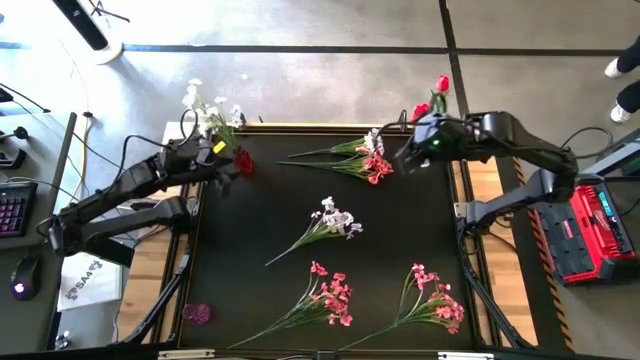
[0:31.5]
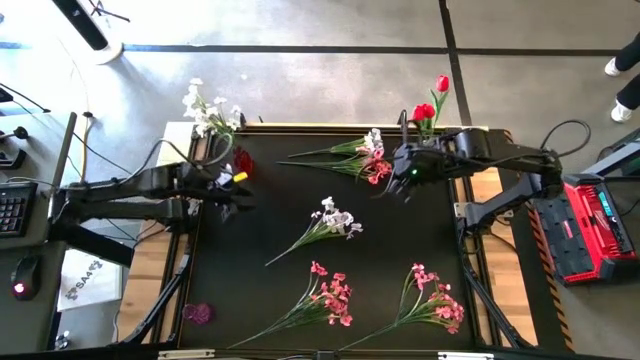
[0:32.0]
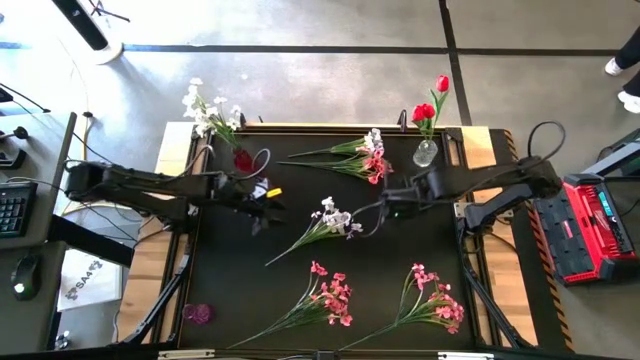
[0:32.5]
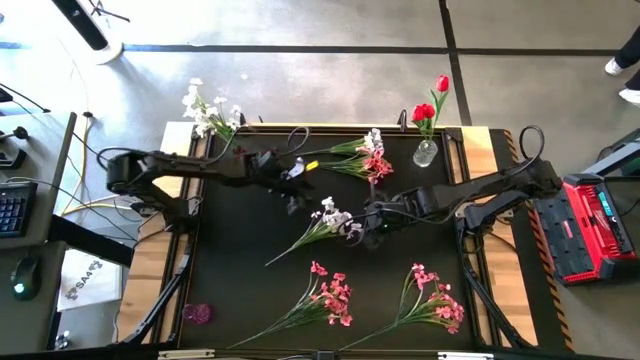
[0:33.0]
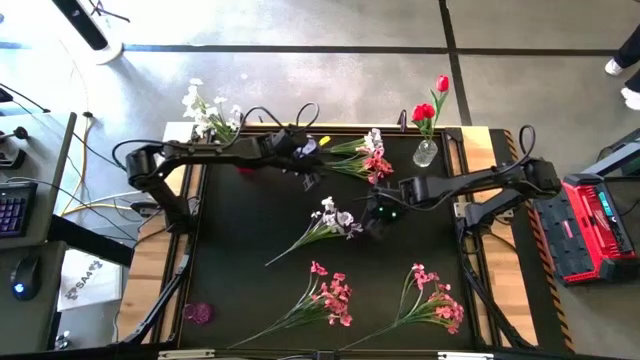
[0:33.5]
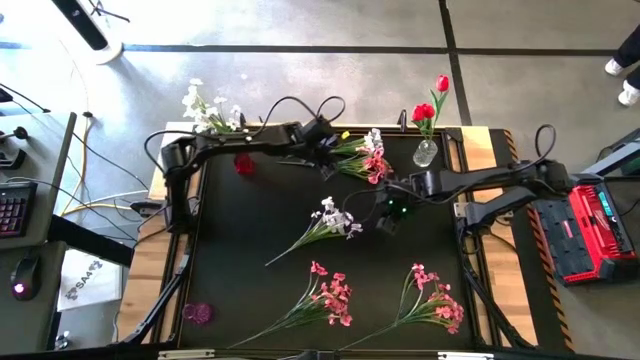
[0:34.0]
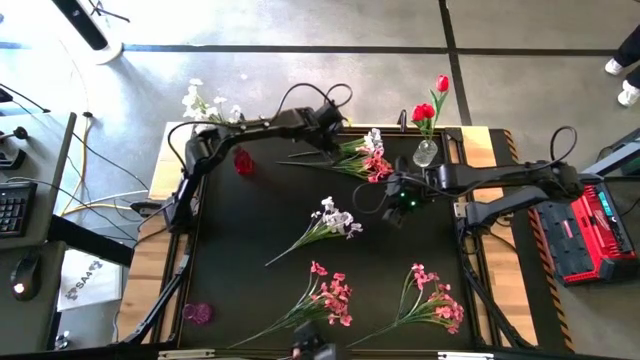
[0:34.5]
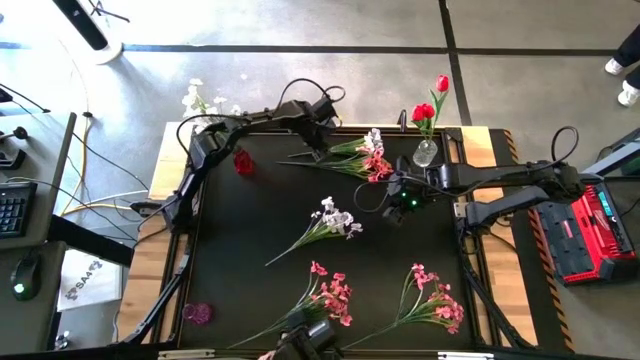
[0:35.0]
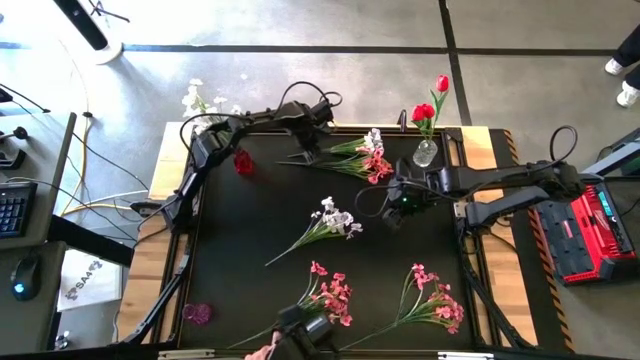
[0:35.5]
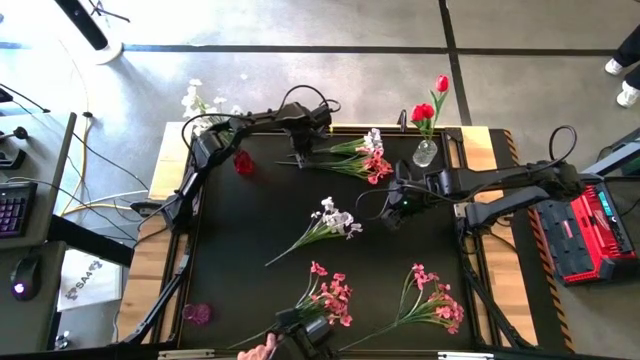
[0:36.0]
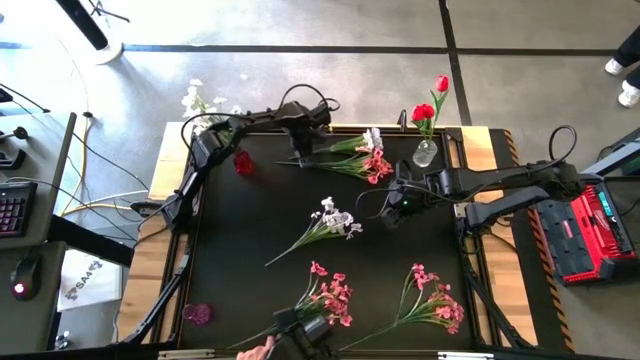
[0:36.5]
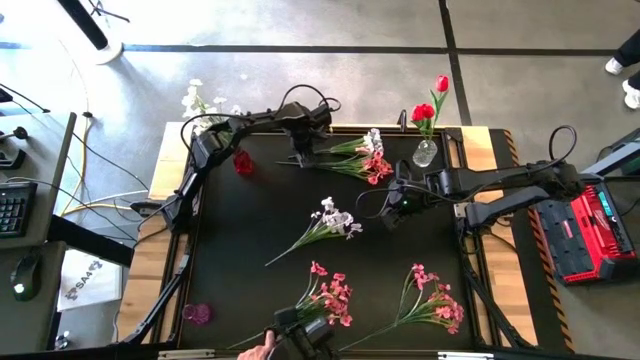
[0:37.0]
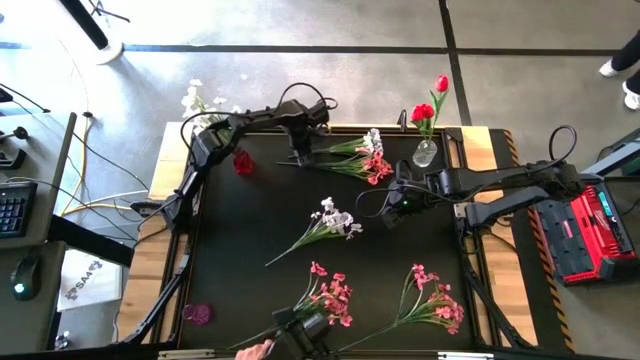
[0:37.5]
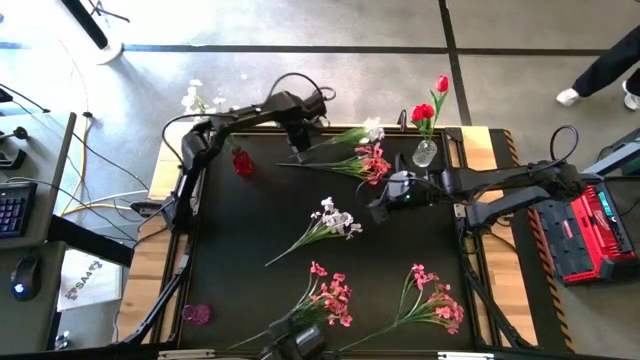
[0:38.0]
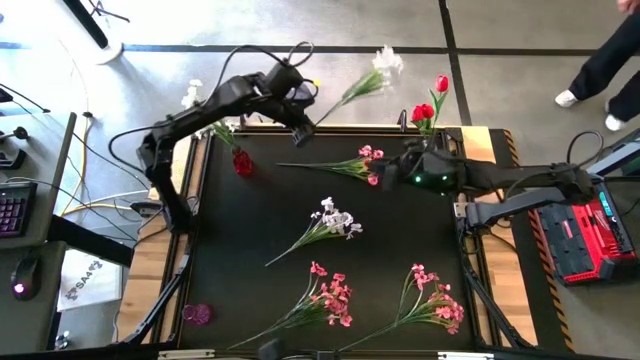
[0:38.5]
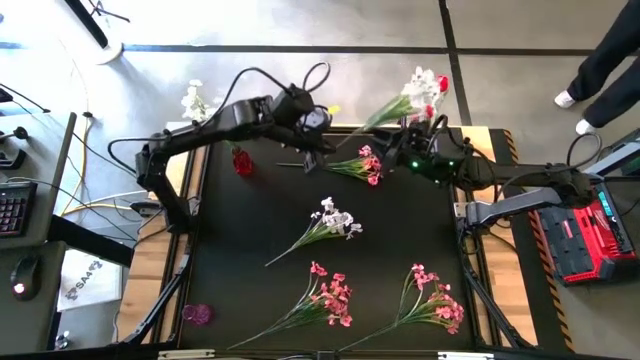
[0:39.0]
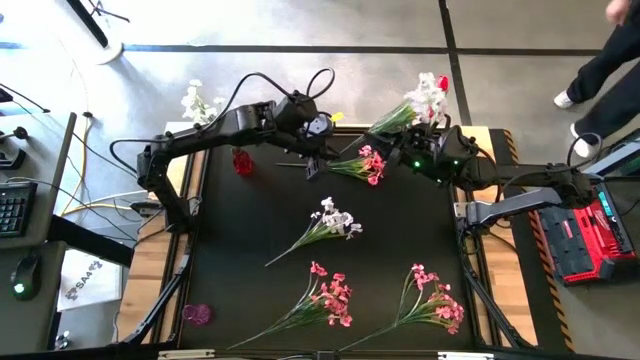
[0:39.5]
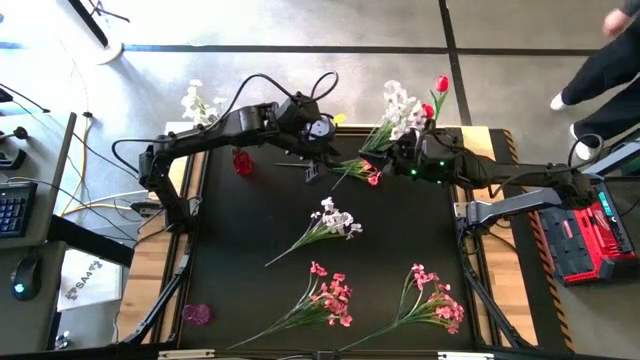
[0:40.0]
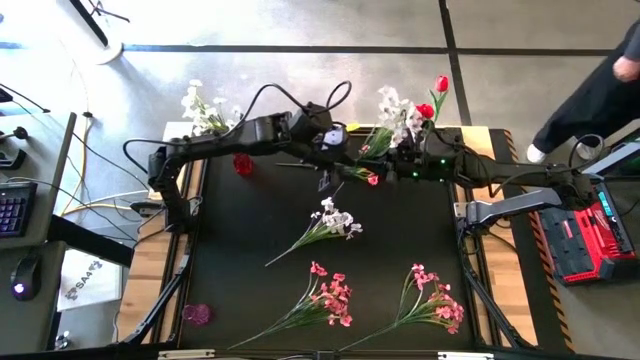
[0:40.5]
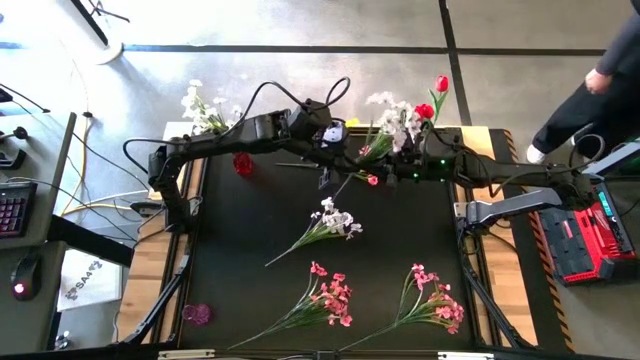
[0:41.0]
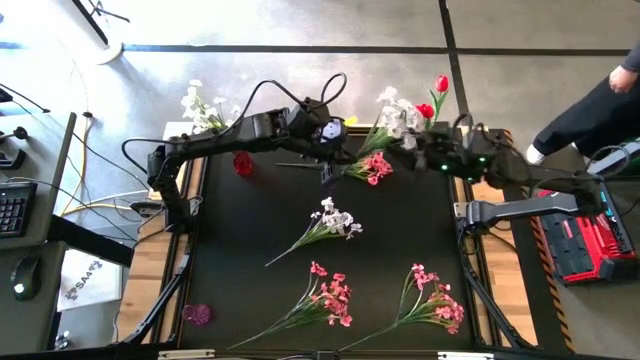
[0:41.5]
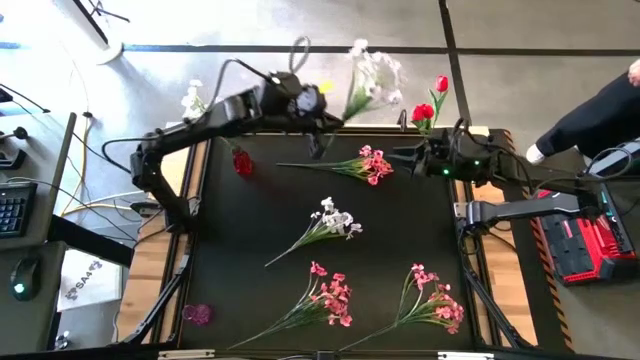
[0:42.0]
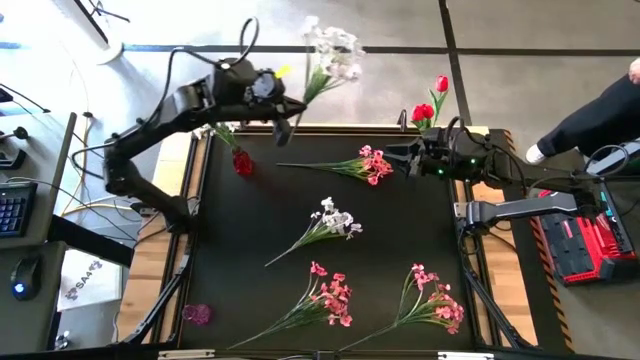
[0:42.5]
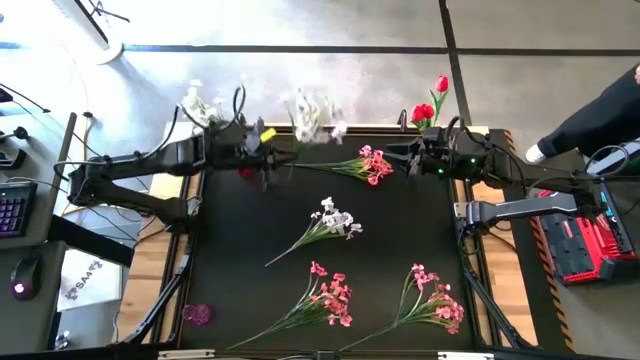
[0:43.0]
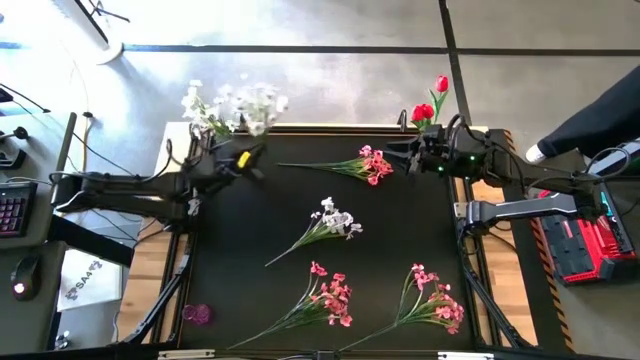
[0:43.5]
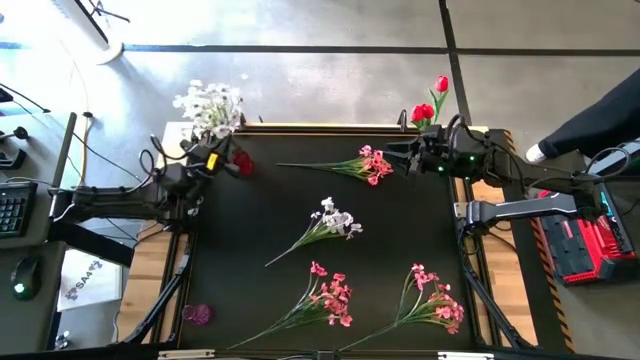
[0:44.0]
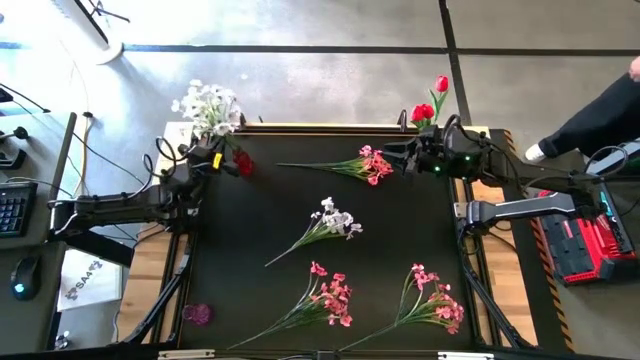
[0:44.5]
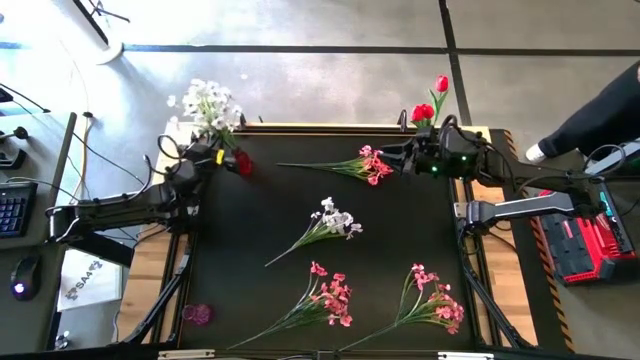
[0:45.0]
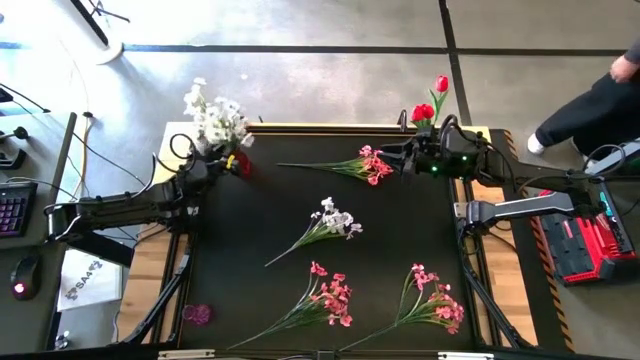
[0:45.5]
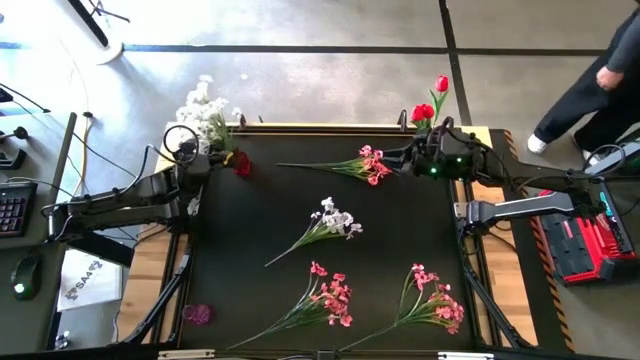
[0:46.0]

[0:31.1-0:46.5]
Task: Sort flowers into vase by color
Put the top white flowers into the red vase

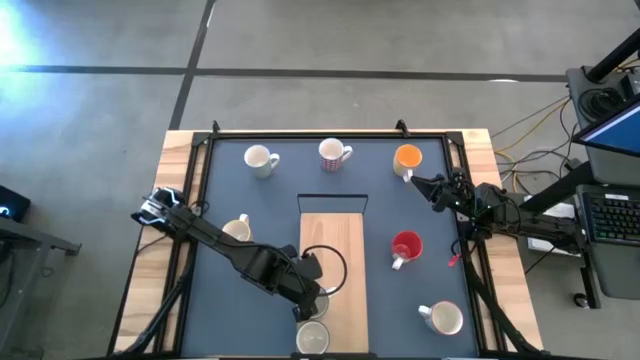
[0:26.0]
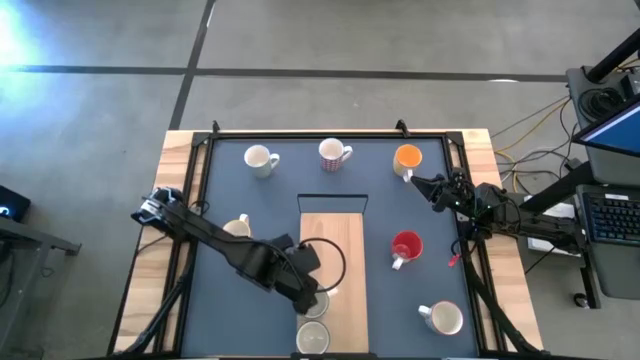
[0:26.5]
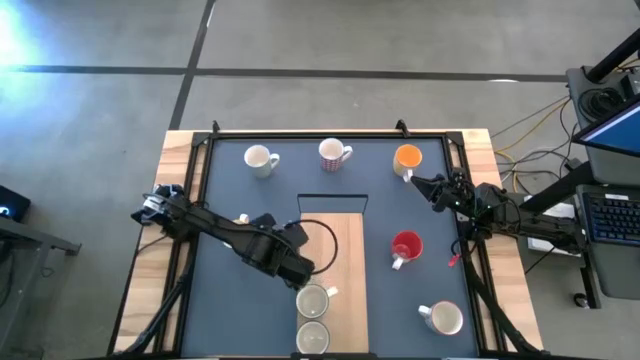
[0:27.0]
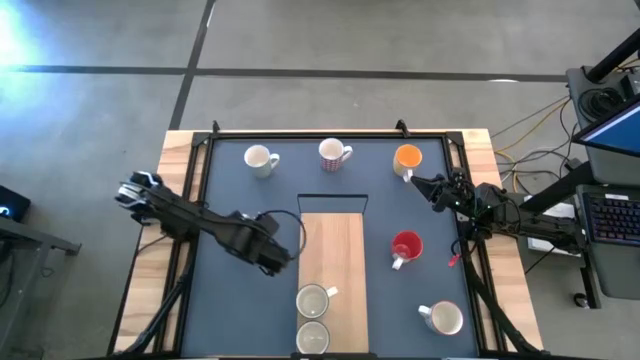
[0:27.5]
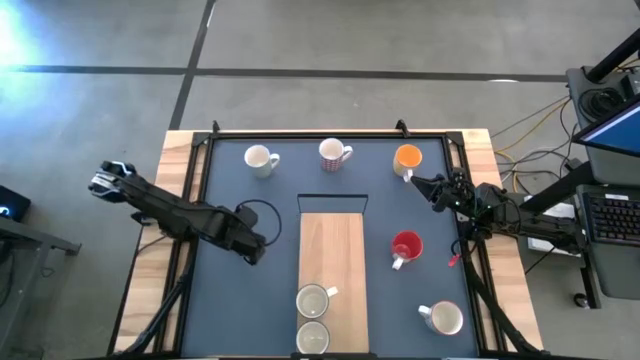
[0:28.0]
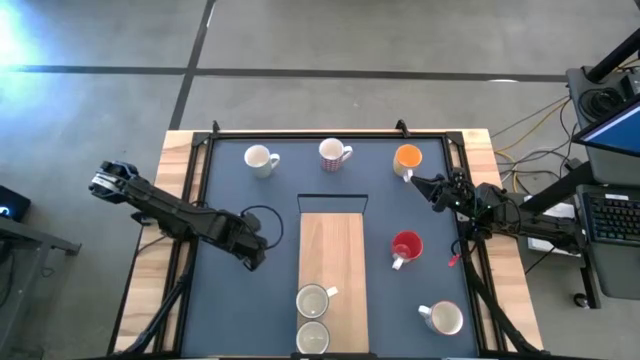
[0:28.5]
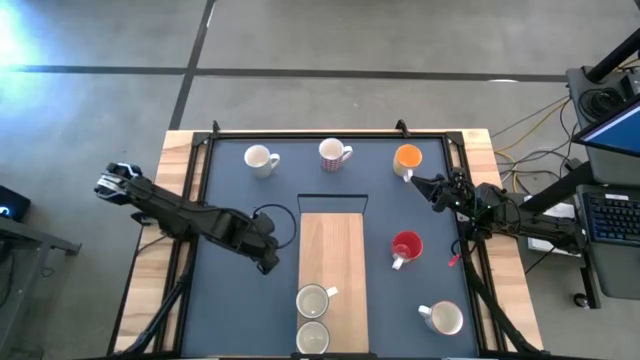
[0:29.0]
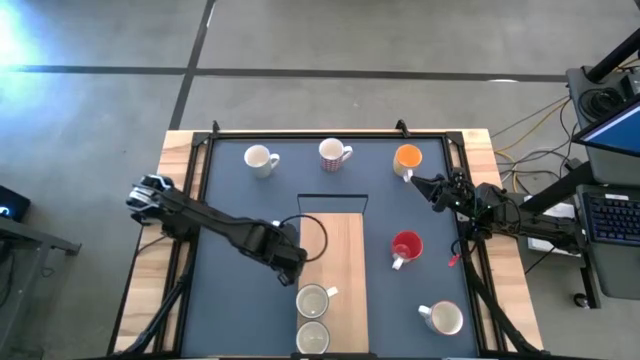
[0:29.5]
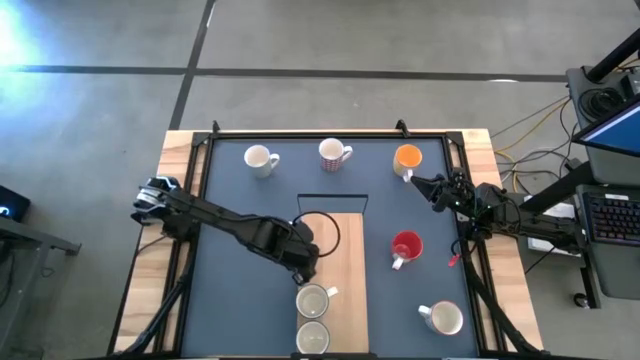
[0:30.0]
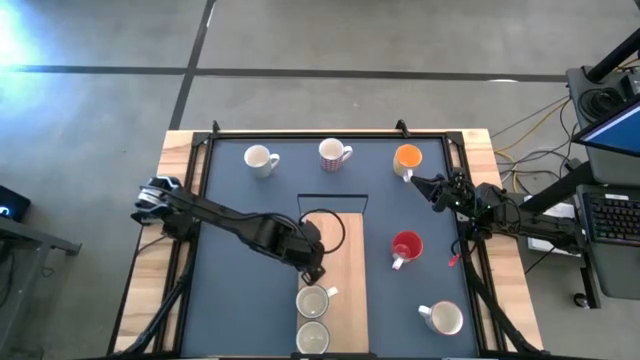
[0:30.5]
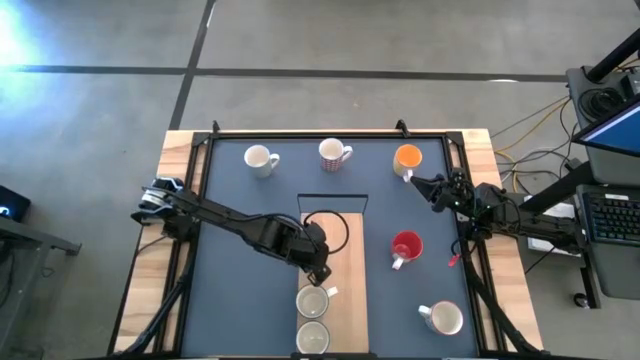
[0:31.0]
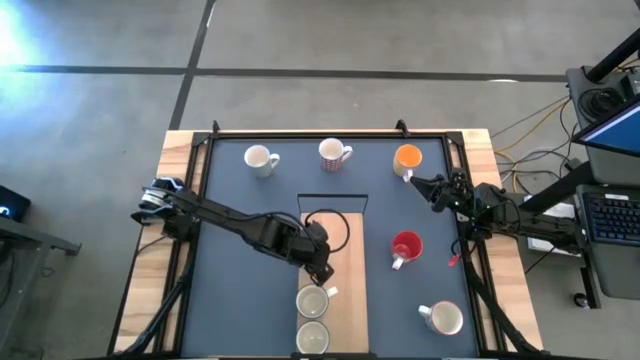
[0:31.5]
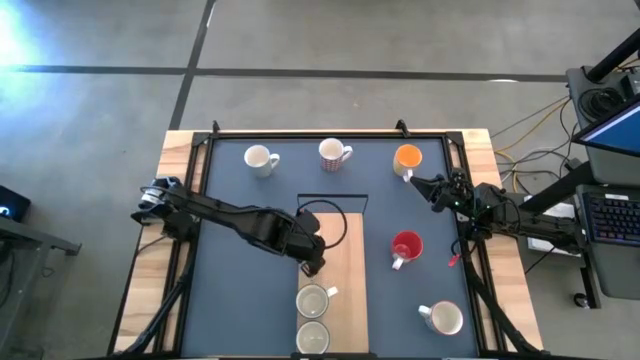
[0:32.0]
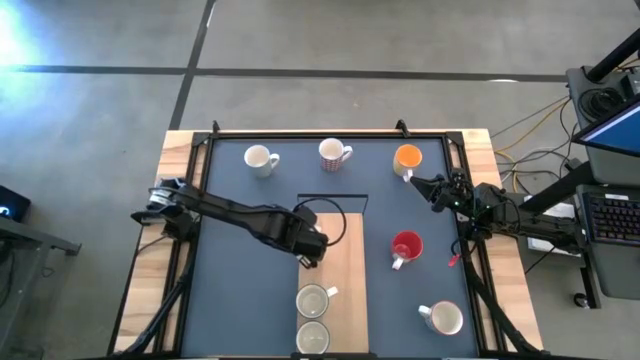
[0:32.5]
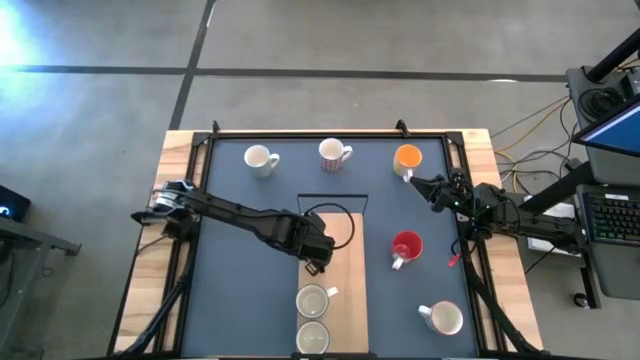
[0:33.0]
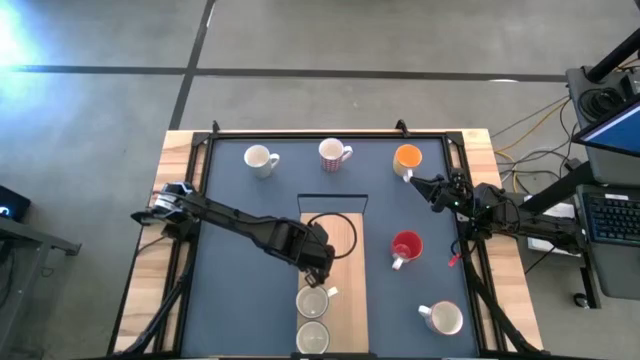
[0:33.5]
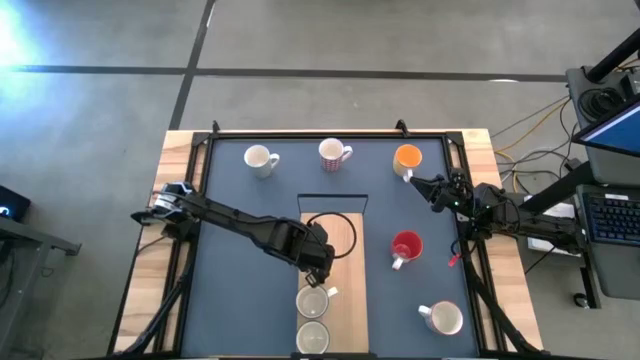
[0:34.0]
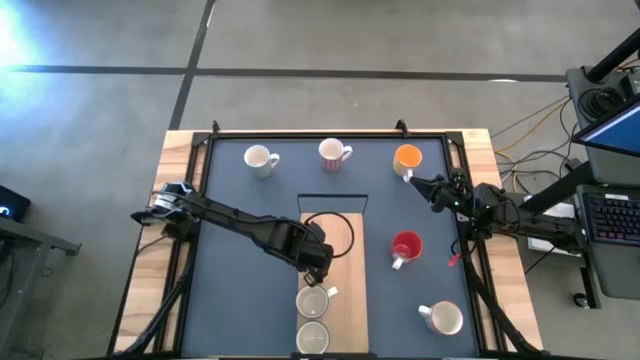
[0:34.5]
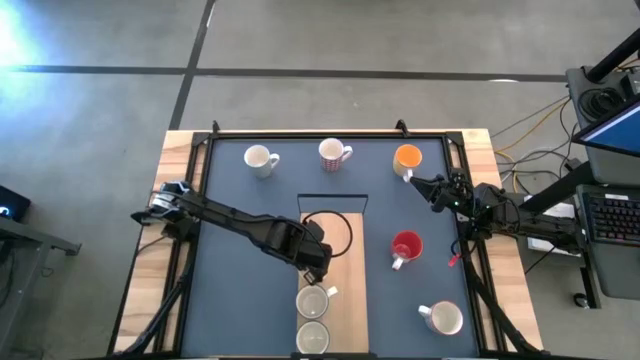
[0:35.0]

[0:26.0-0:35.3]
Task: Place coffee mugs
Put the red and yellow mug on the shelf
